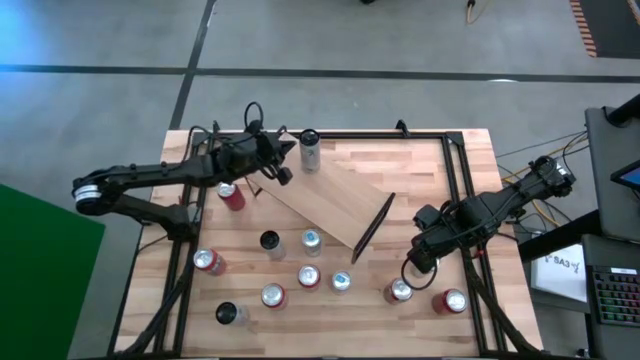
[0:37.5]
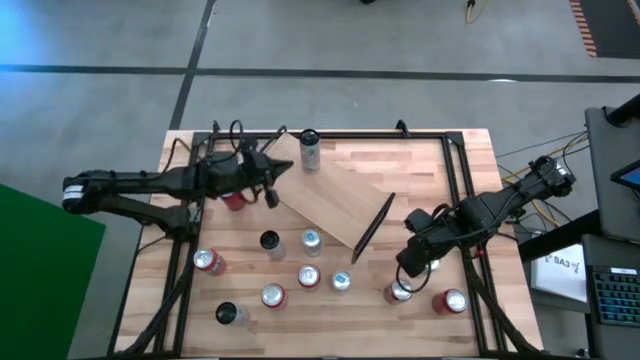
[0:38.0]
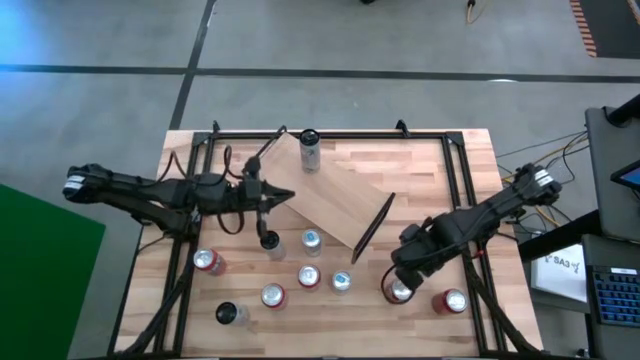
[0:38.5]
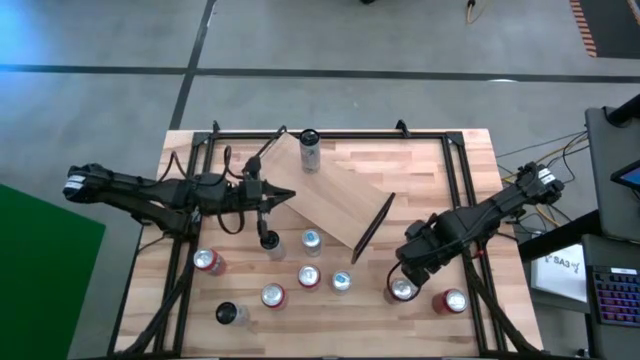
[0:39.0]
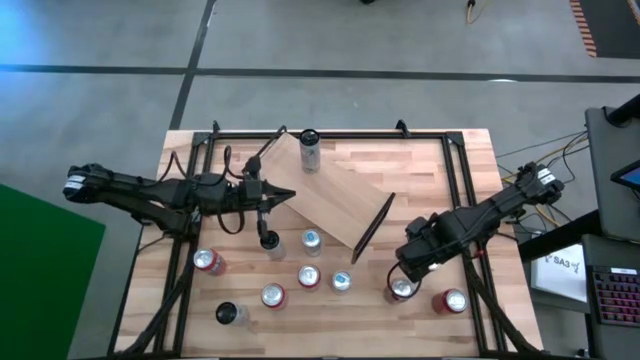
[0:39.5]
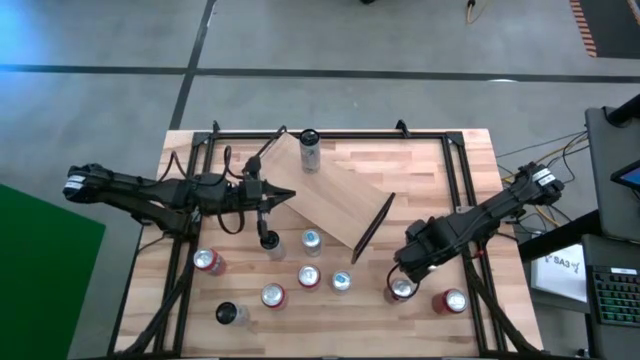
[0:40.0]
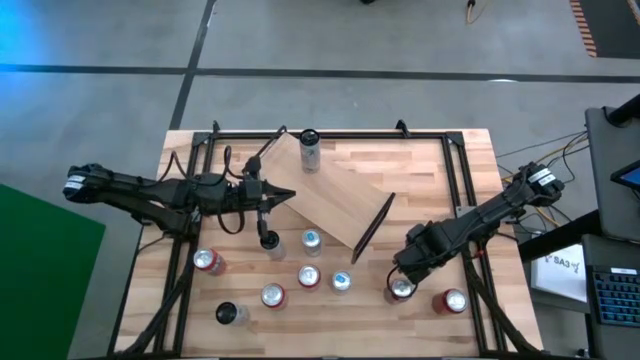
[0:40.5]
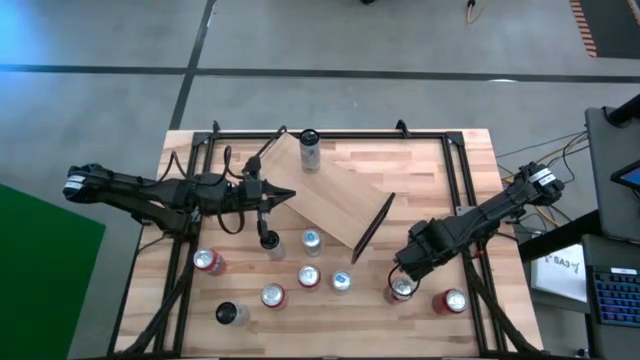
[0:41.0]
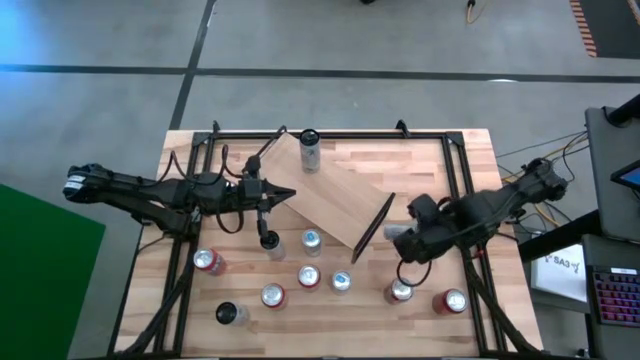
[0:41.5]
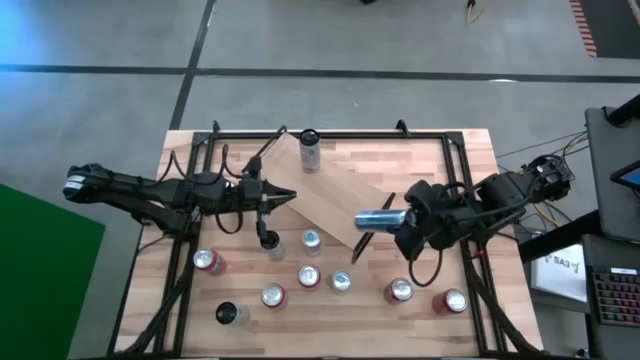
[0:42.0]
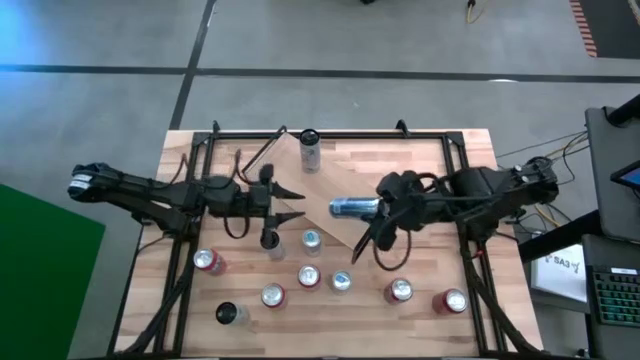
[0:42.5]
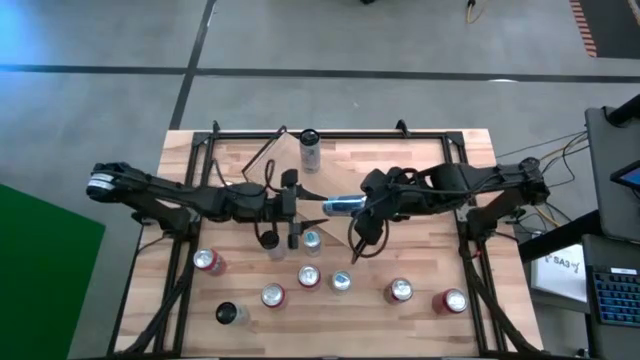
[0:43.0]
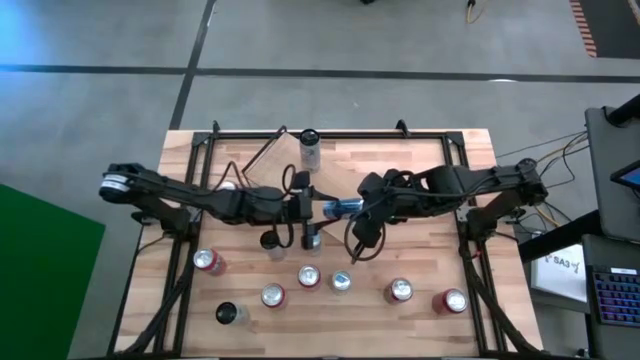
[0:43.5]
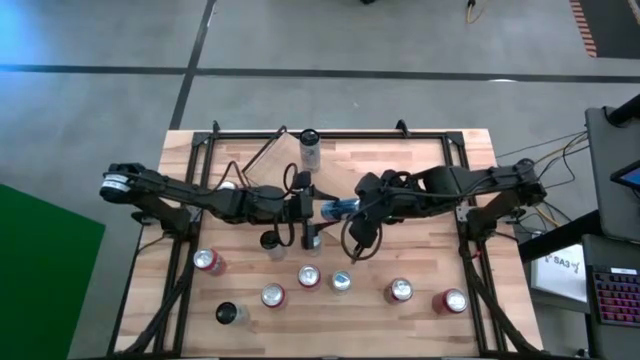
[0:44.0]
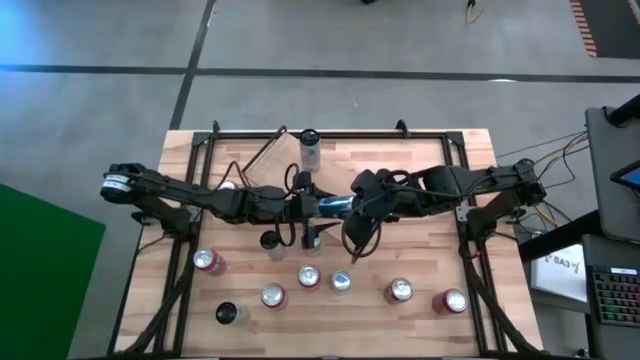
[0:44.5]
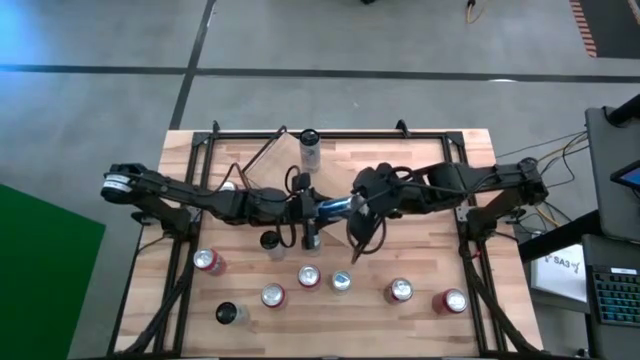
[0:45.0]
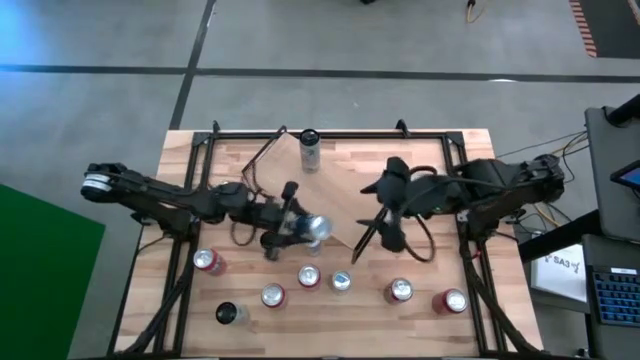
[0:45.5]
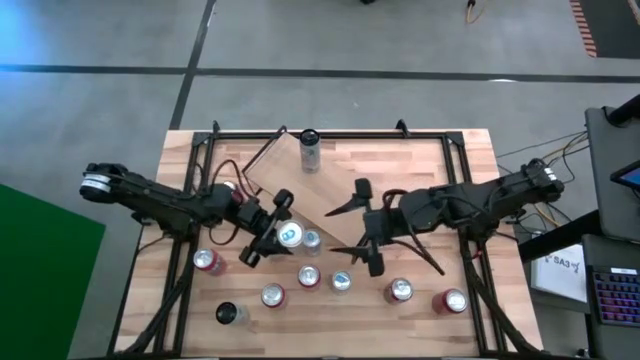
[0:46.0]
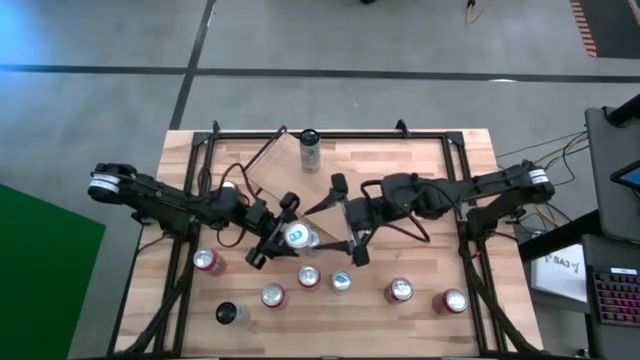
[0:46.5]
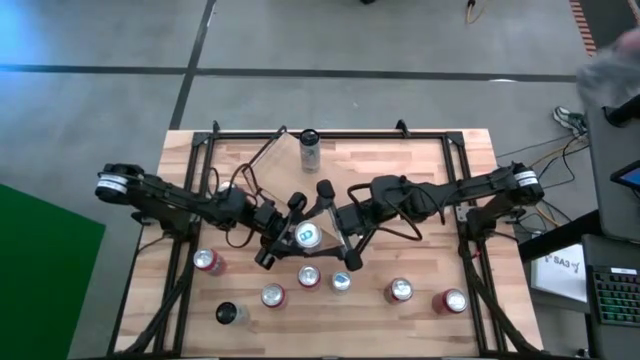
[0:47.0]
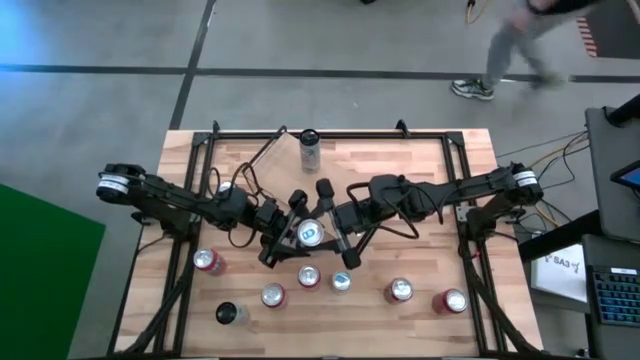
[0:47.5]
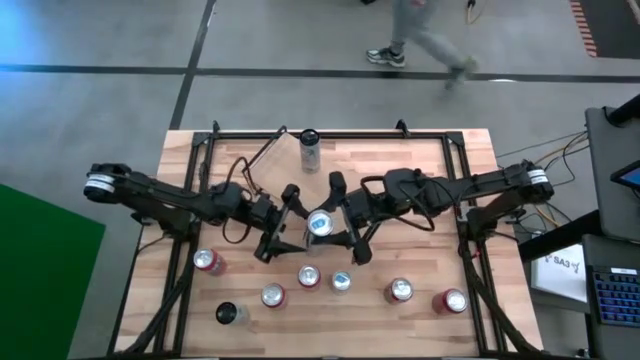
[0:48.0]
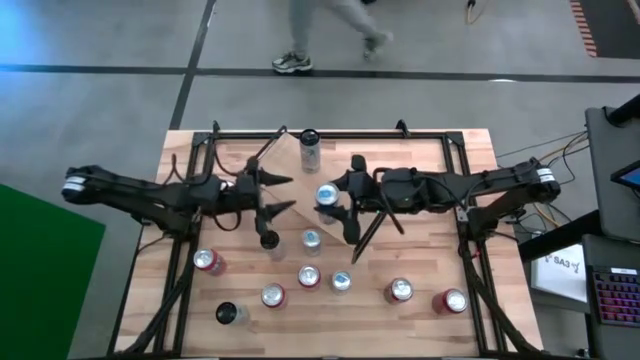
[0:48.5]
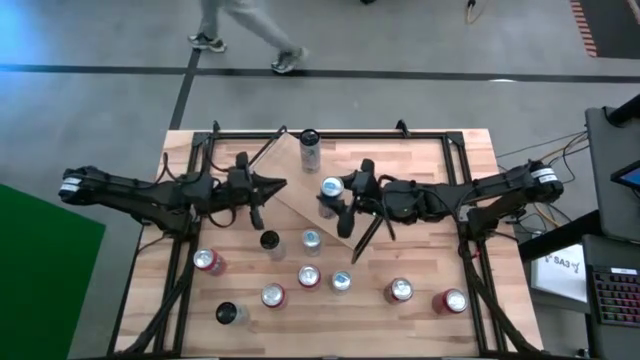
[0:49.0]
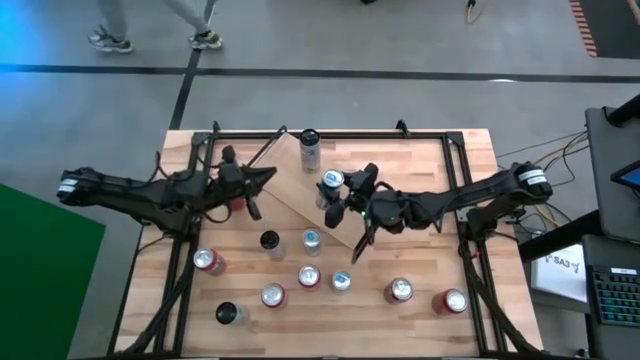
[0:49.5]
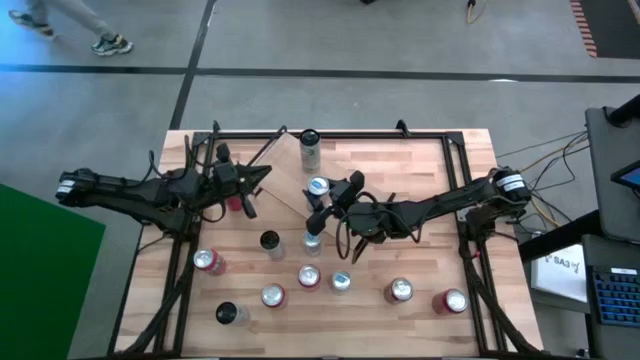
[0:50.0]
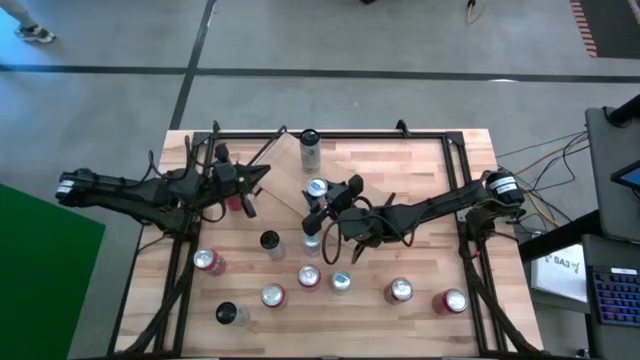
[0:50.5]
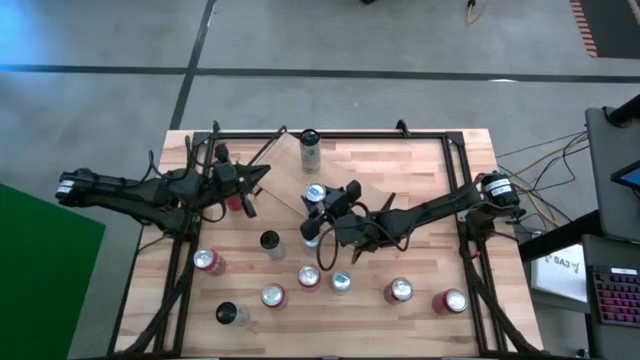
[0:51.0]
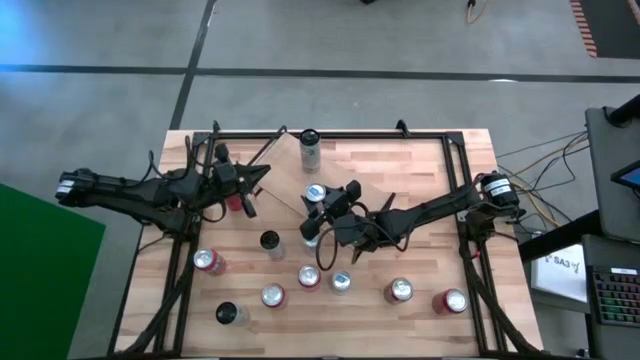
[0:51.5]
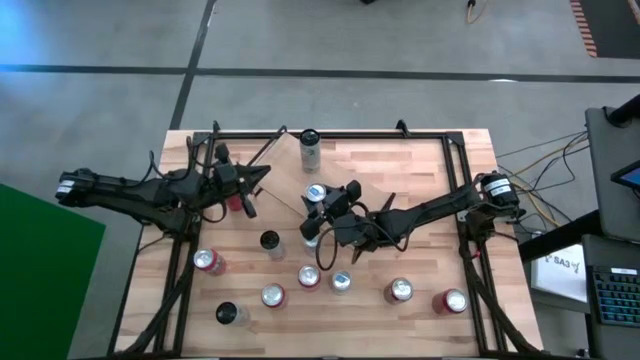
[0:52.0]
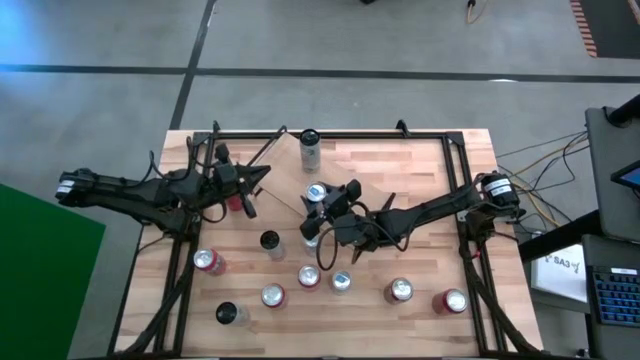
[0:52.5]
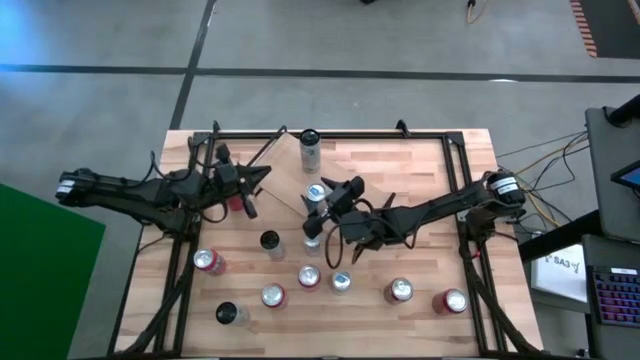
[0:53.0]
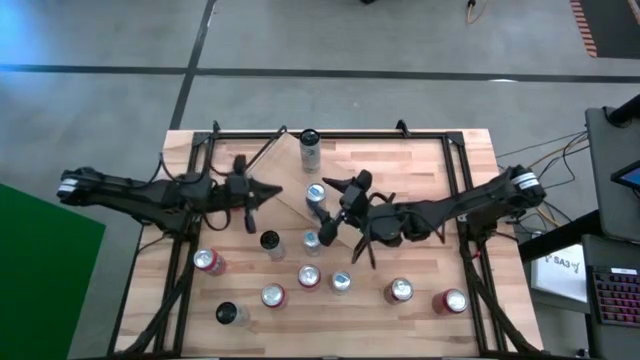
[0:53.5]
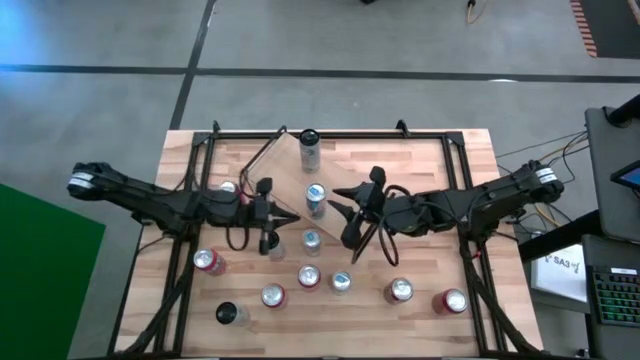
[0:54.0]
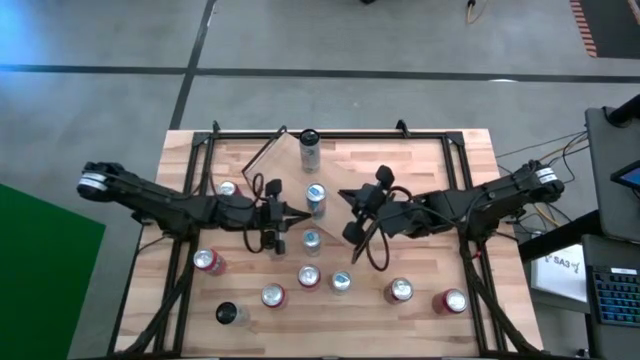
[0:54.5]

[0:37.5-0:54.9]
Task: Place canned beverage on shelf
Put the silver/blue soda can on the shelf

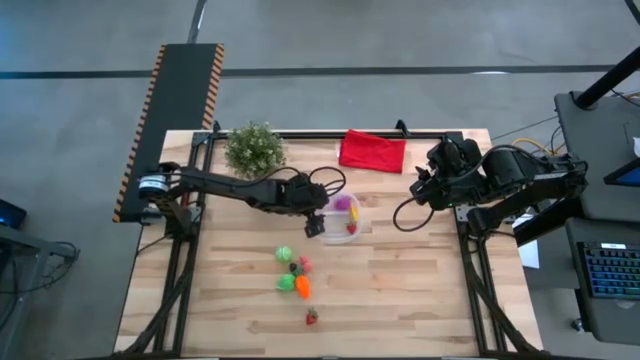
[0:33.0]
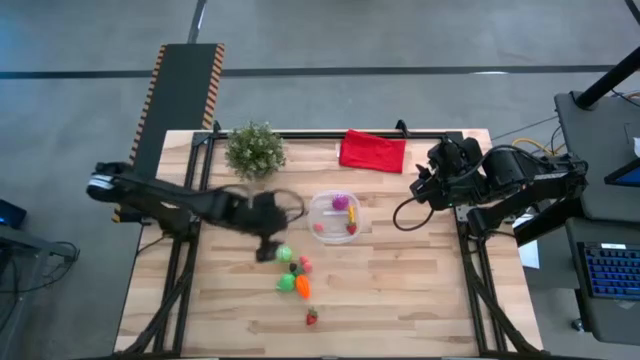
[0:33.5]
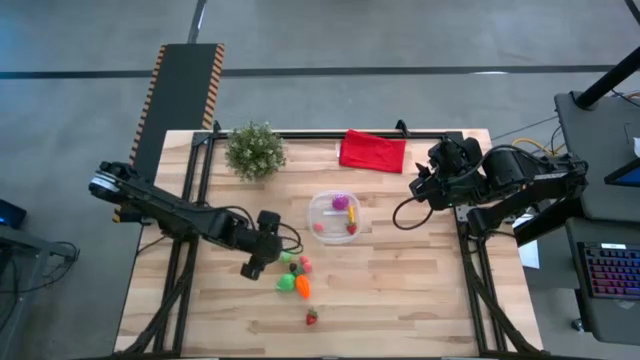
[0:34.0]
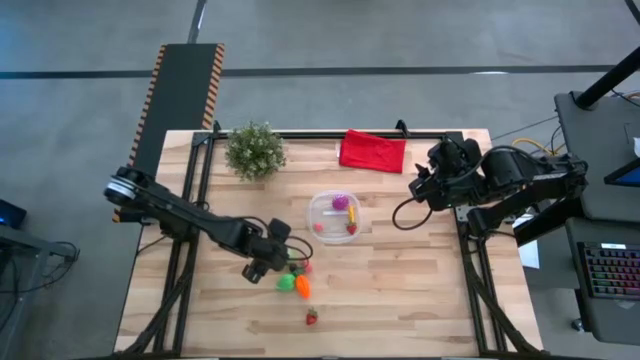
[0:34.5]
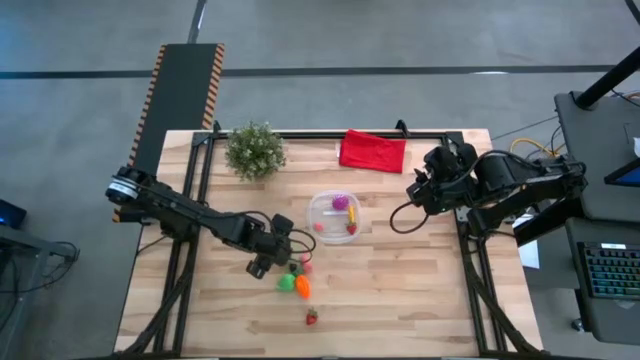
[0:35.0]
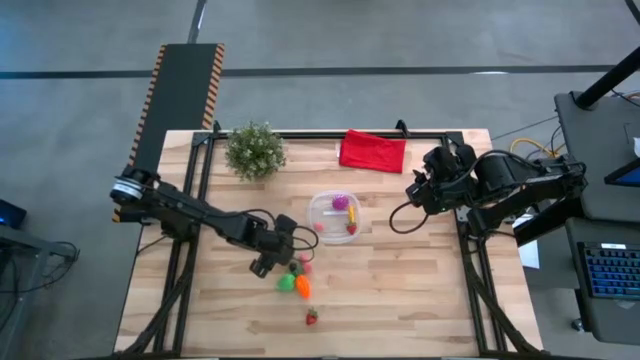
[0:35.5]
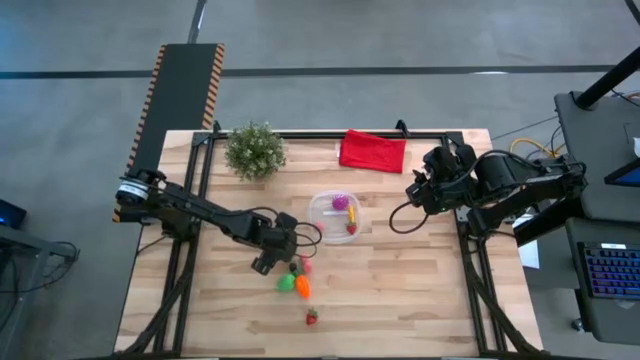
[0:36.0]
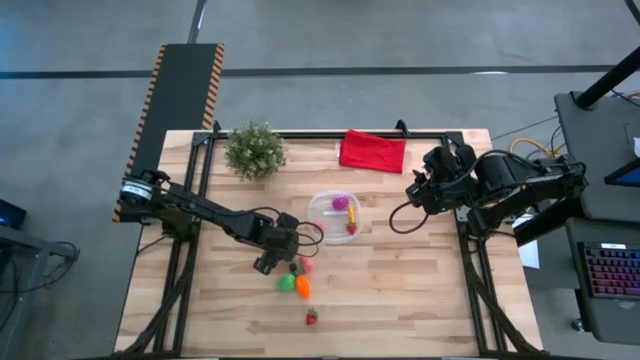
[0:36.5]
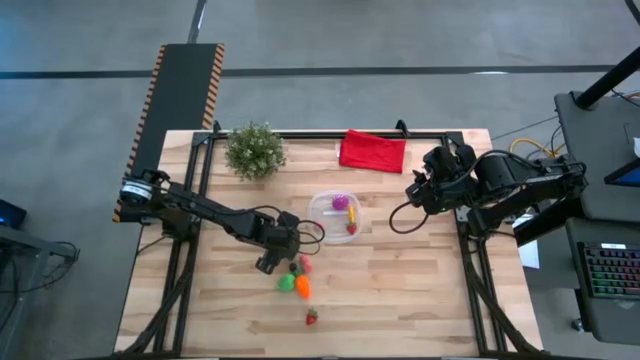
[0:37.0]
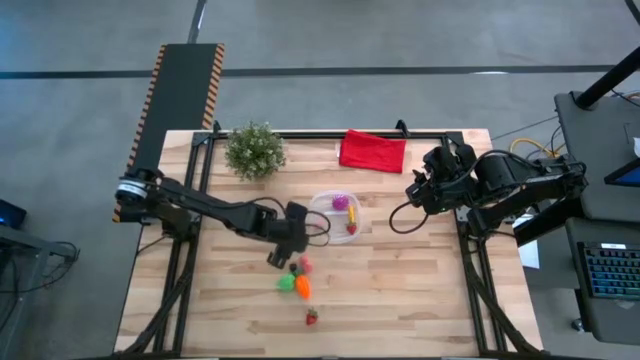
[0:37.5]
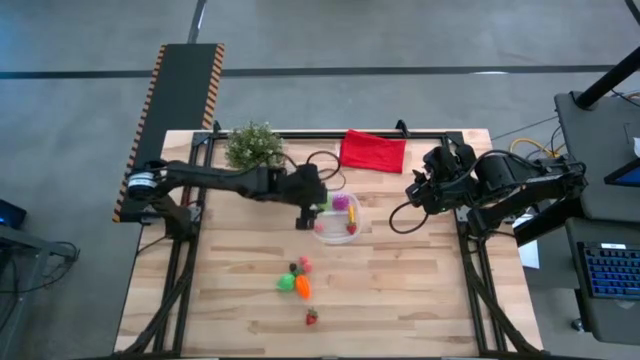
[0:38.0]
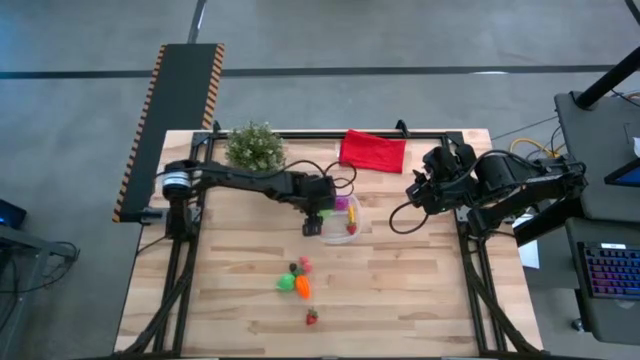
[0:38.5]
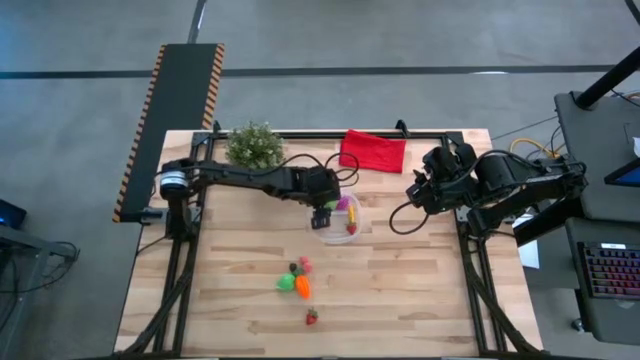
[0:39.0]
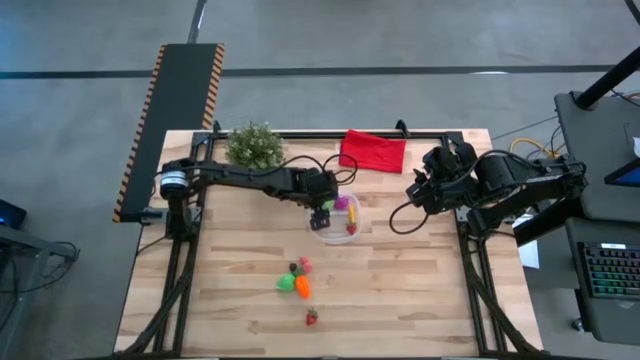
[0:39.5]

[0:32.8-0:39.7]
Task: Pick and placing Produce into tupperware
Put the green cabbage into the transparent container
